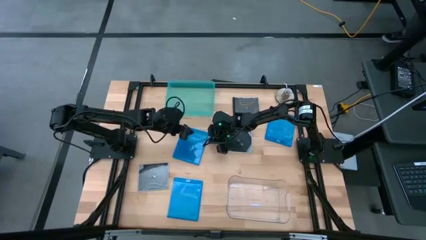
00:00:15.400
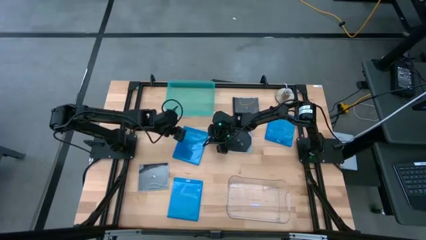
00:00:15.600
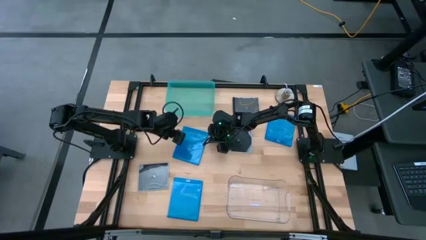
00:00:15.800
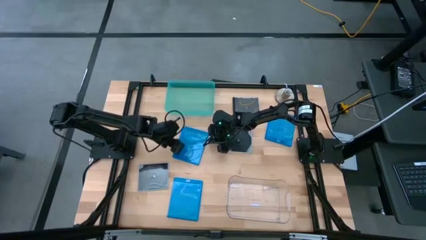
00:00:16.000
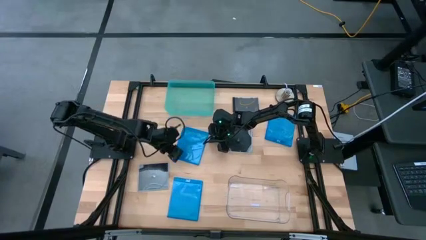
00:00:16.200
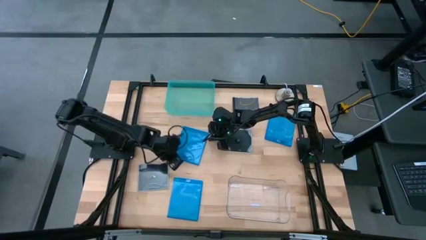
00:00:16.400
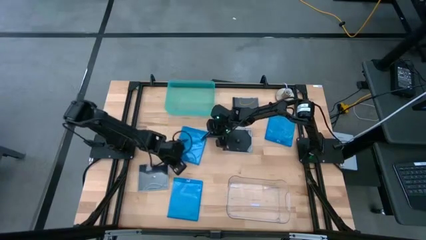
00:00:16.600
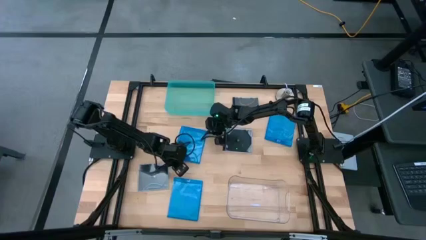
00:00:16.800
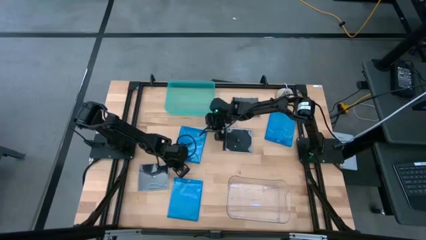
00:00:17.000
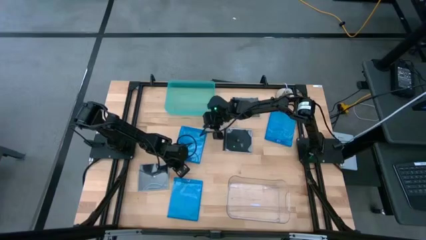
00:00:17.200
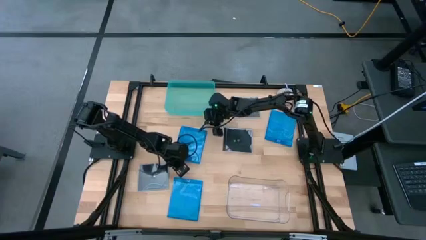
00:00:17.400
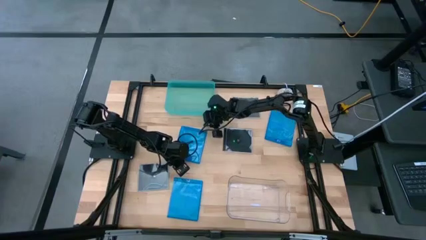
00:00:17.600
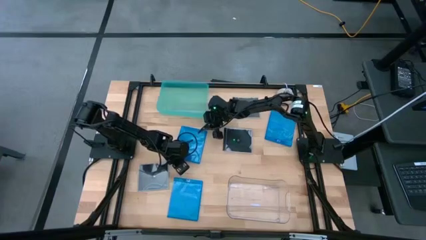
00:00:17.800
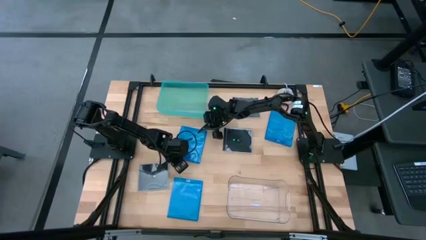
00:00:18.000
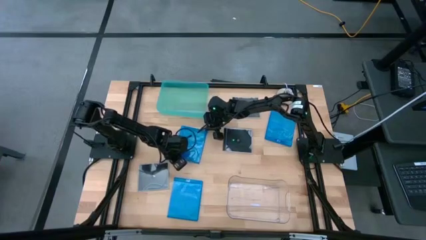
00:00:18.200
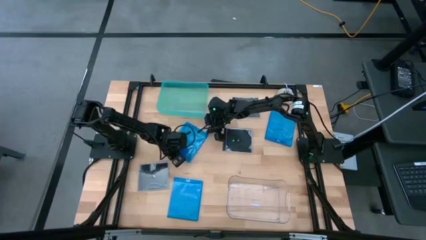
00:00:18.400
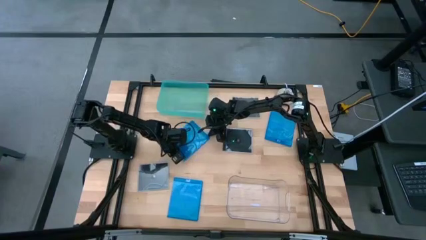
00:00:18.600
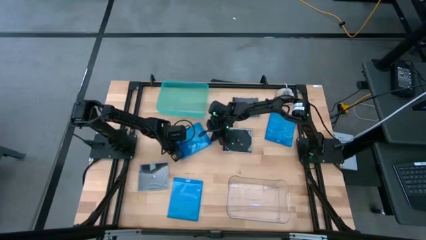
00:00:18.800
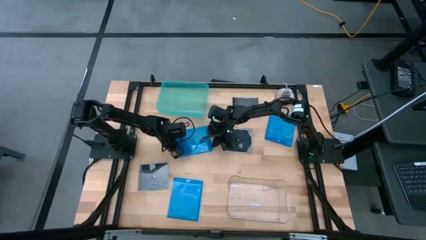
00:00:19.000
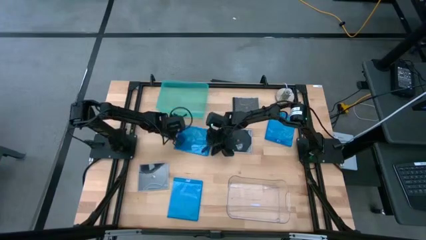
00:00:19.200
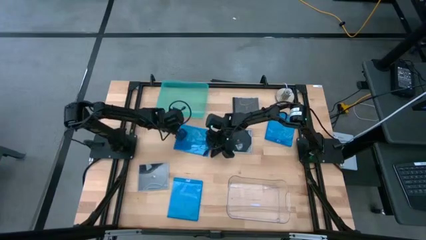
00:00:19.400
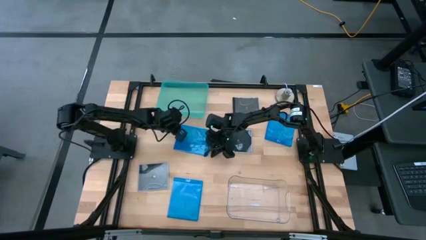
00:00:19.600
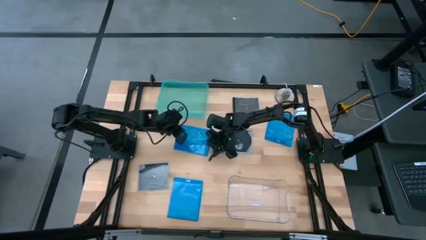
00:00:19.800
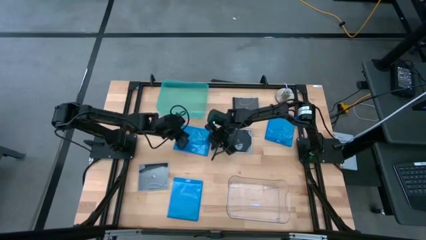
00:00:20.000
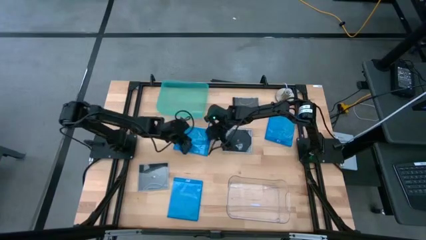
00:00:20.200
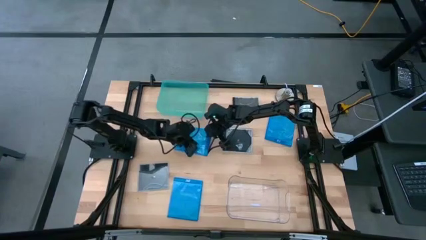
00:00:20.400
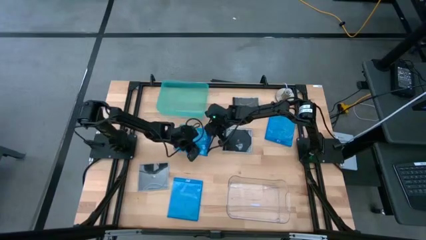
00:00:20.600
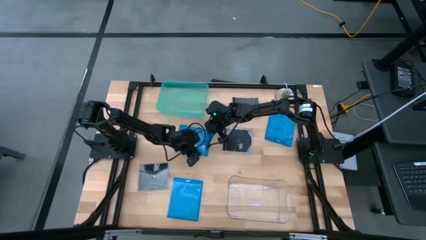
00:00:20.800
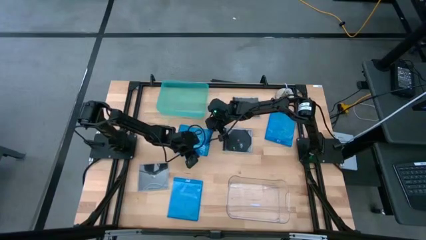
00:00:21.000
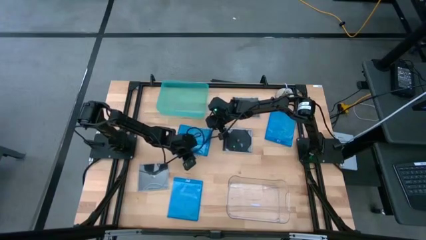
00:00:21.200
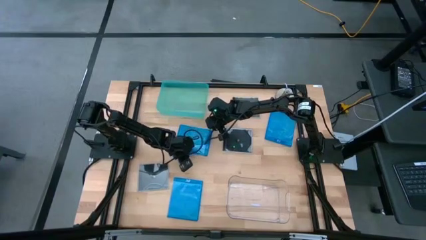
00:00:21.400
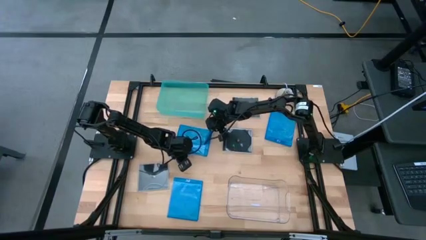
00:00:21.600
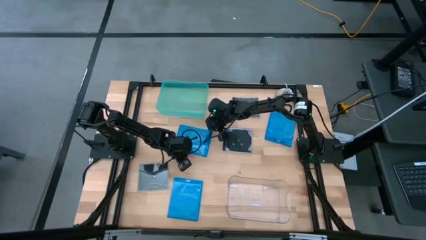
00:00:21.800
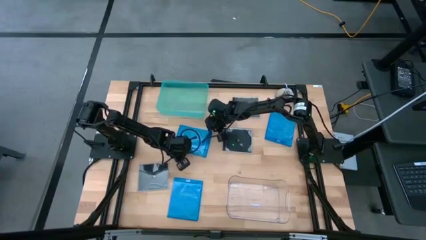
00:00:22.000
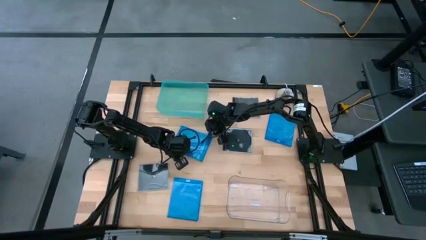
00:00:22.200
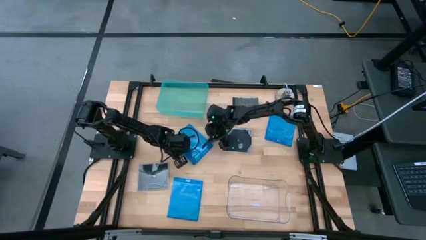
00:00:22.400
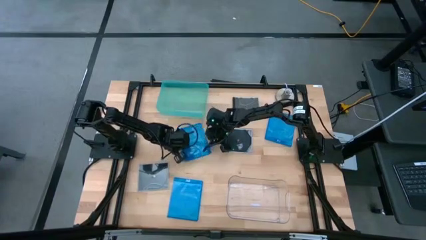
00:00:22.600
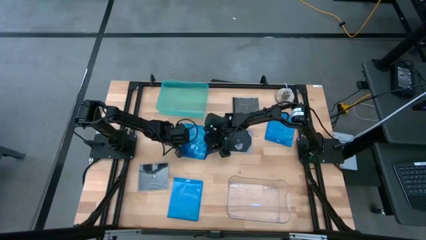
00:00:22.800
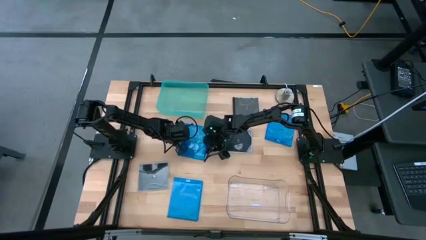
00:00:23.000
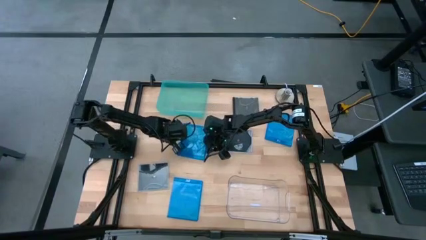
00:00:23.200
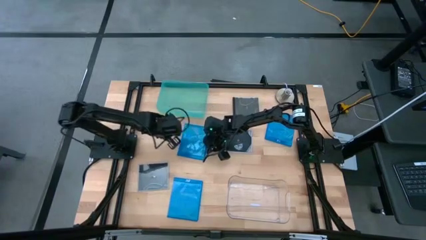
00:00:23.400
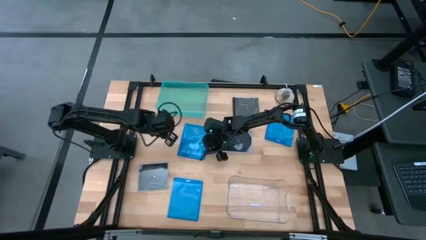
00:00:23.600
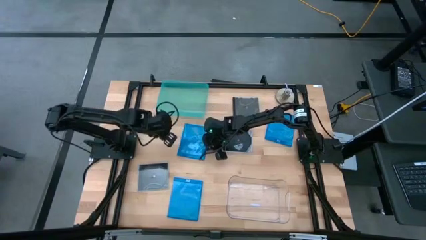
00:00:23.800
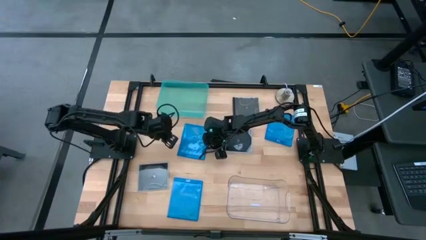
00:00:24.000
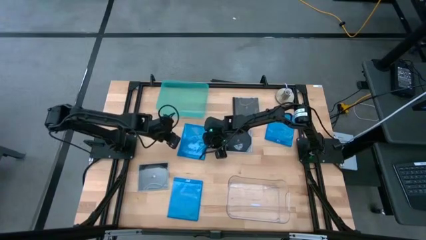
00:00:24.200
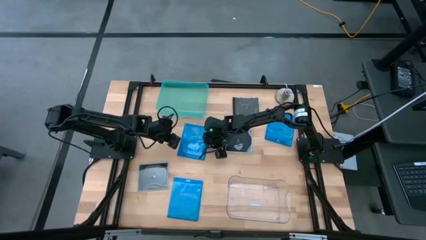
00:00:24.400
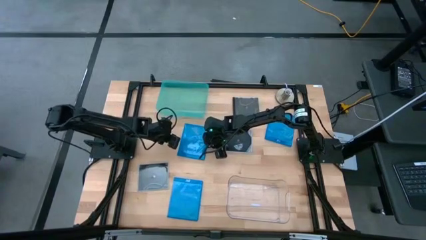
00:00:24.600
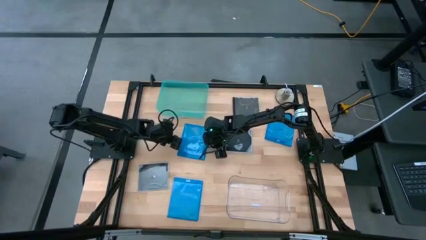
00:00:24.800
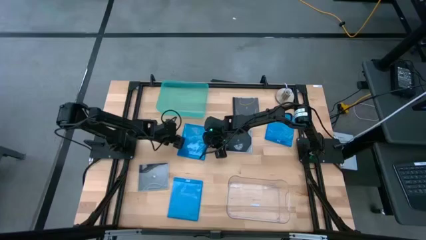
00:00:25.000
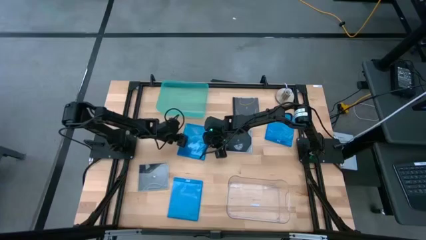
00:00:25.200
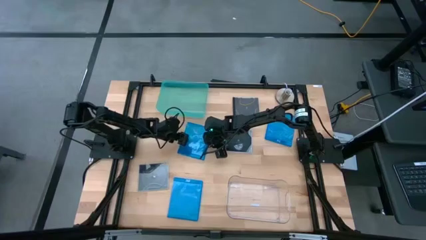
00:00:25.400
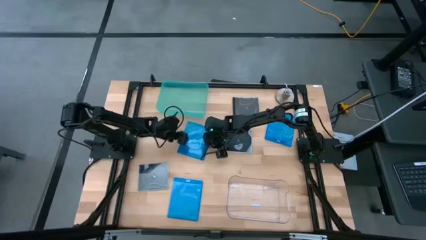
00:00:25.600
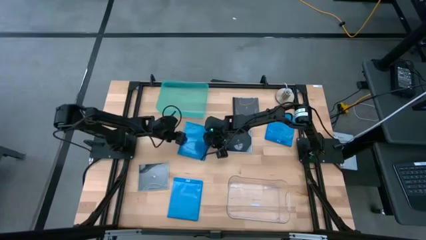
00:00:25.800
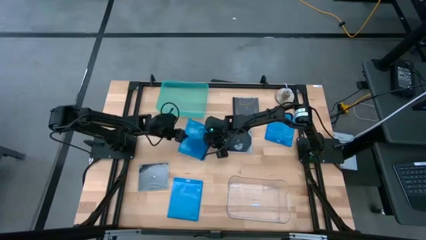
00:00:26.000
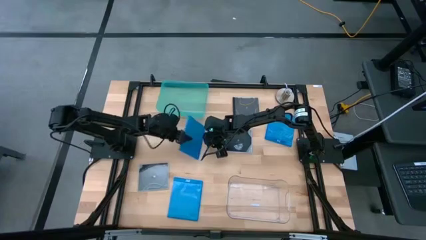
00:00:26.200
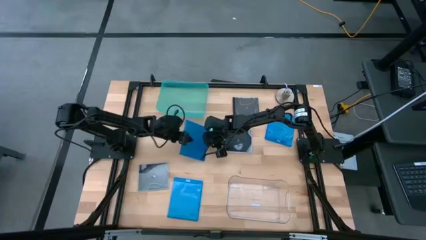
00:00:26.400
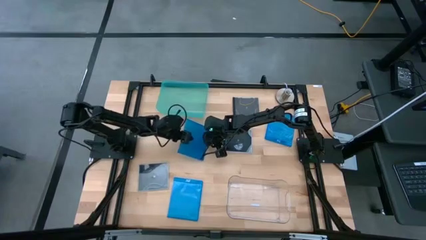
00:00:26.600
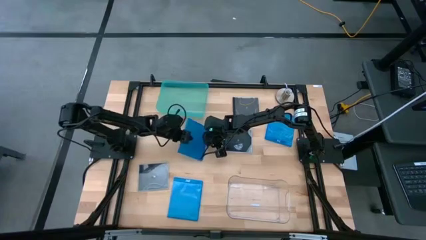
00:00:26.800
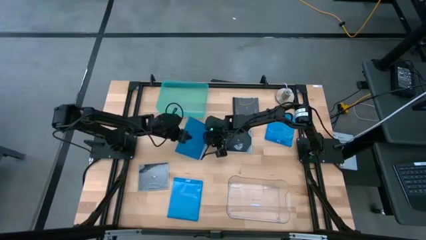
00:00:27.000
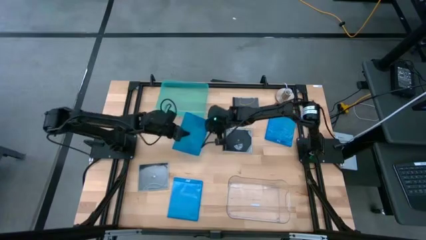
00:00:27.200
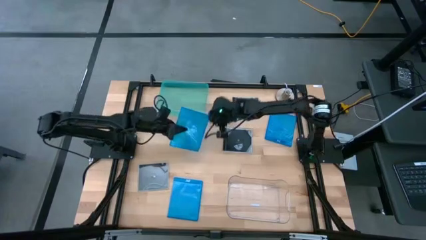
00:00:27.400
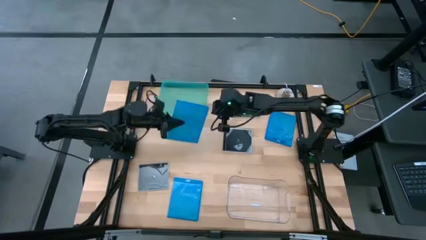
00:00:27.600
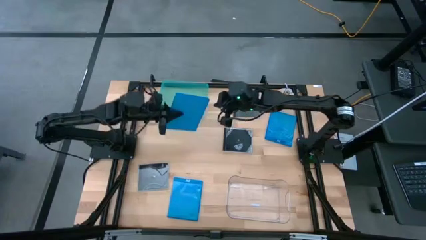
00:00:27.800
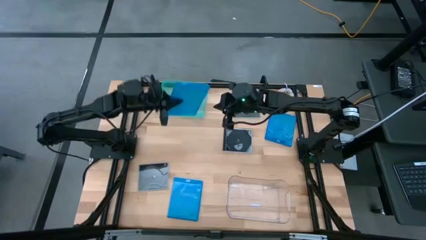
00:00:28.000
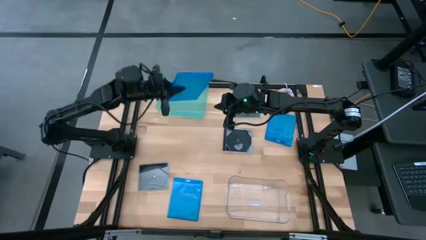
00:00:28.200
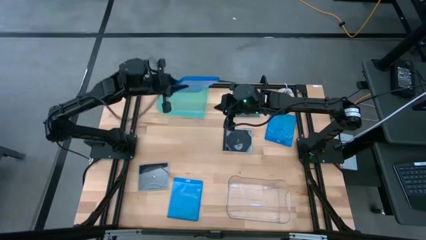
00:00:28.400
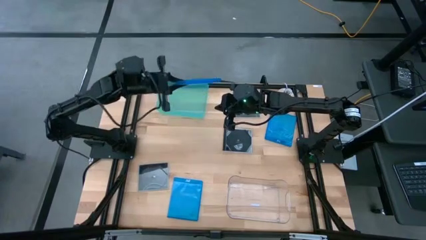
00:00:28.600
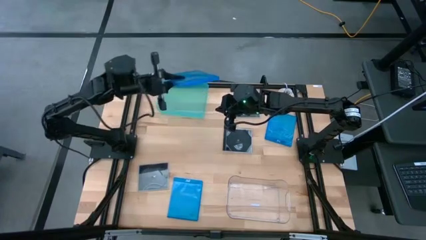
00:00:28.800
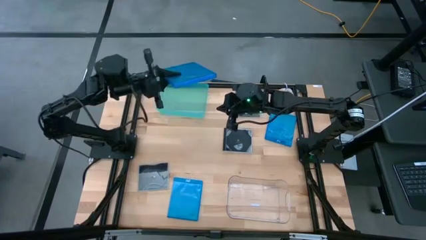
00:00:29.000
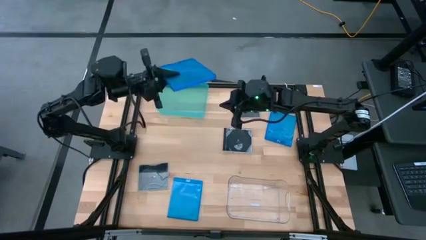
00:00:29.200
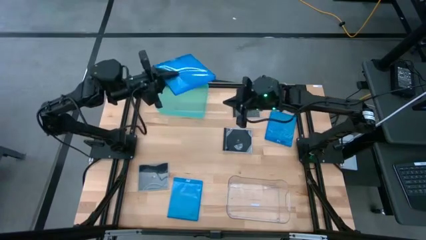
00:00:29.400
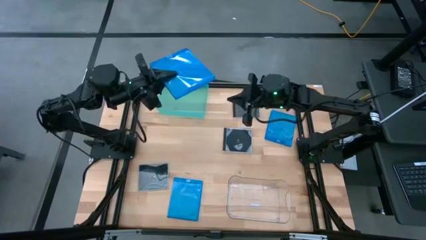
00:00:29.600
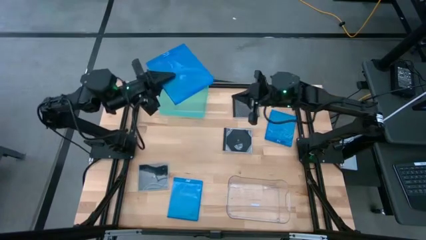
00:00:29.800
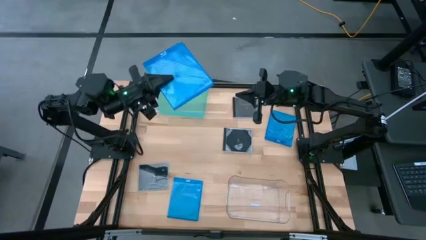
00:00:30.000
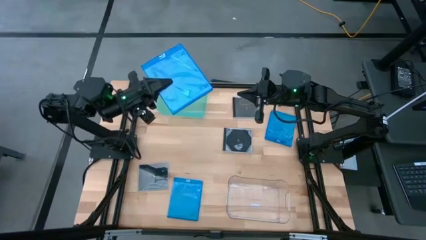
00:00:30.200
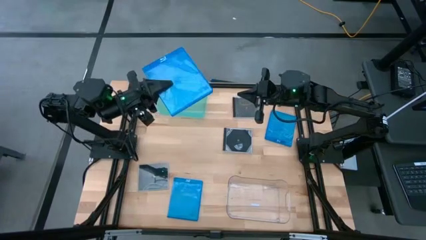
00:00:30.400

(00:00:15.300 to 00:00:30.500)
Task: Pick & place jewel cases by type
Put the top left dark blue CD case into the light blue bin
